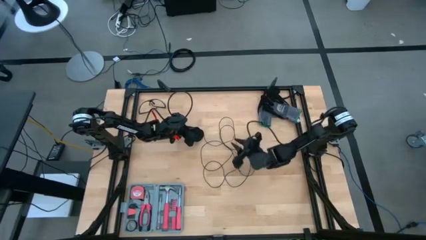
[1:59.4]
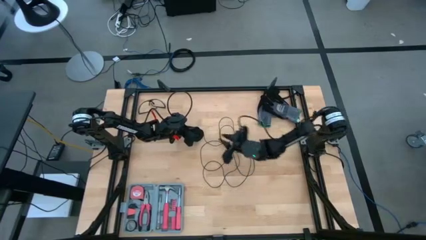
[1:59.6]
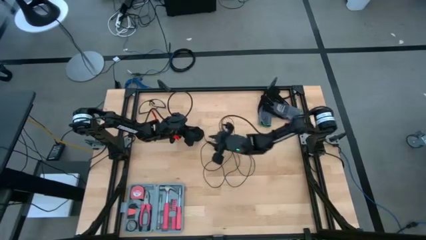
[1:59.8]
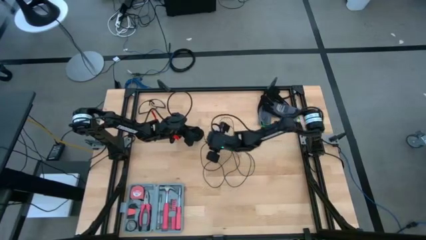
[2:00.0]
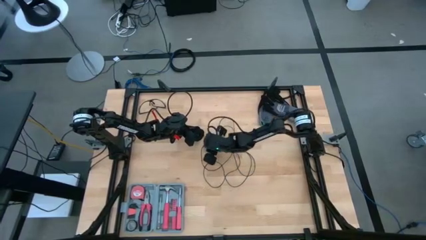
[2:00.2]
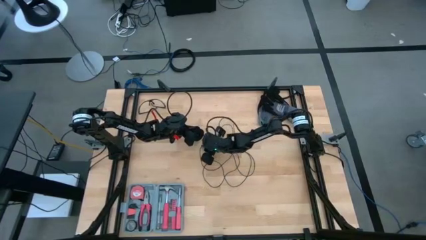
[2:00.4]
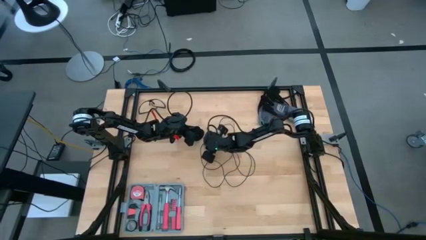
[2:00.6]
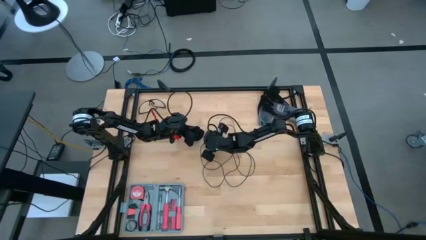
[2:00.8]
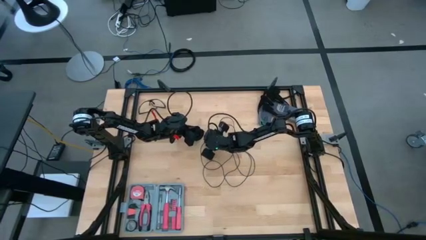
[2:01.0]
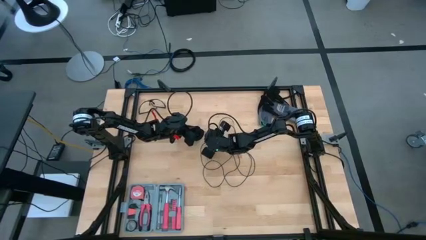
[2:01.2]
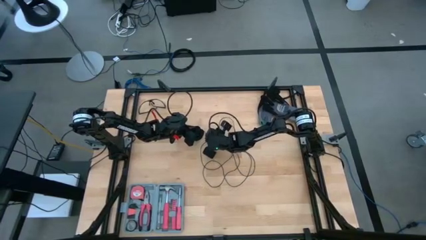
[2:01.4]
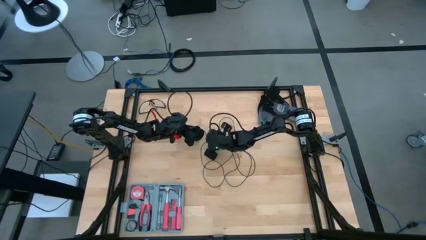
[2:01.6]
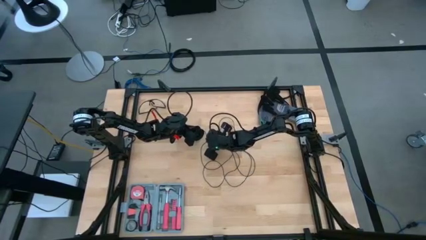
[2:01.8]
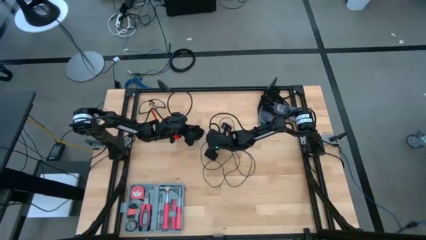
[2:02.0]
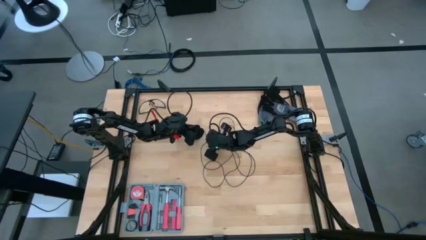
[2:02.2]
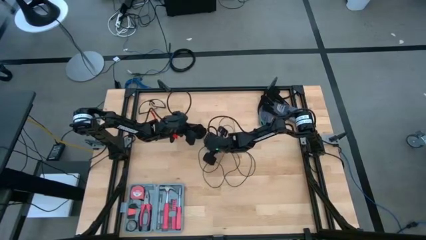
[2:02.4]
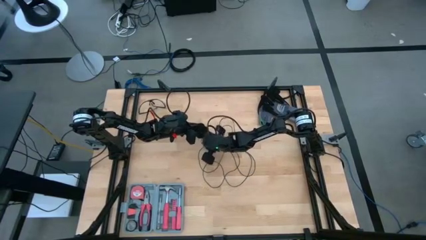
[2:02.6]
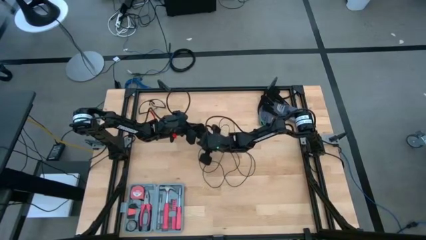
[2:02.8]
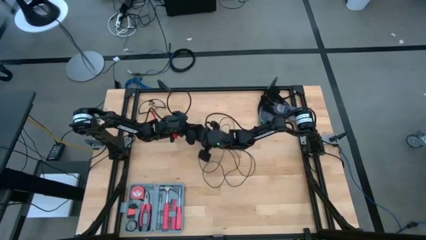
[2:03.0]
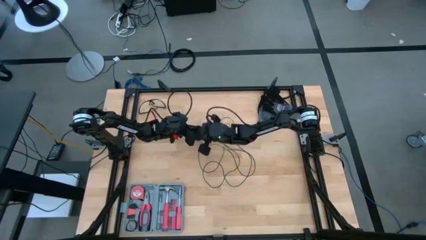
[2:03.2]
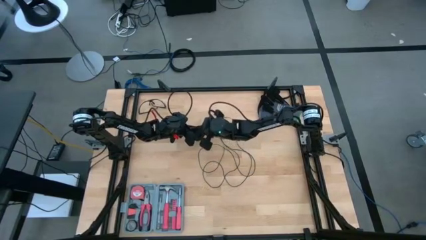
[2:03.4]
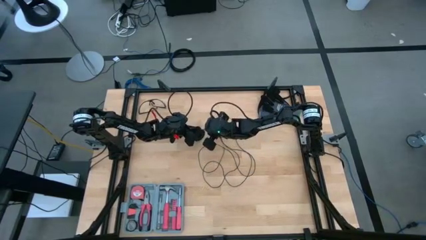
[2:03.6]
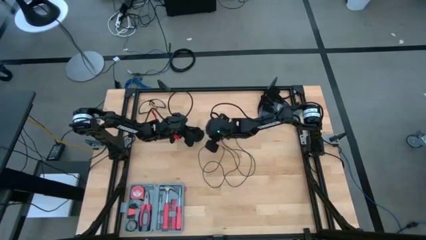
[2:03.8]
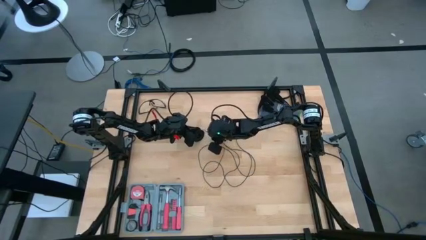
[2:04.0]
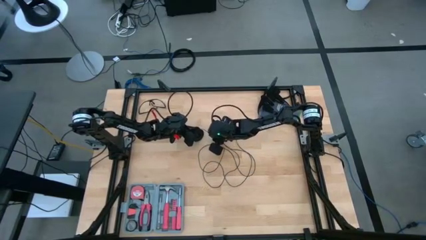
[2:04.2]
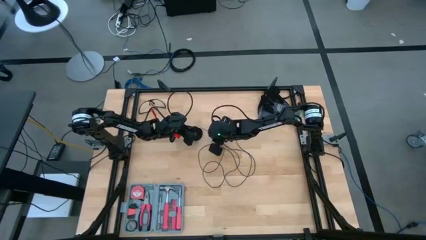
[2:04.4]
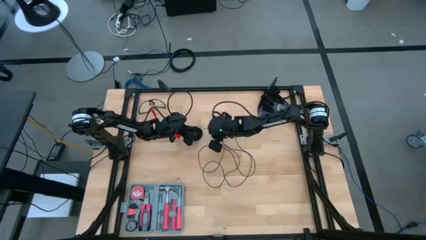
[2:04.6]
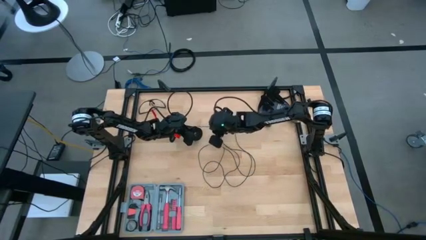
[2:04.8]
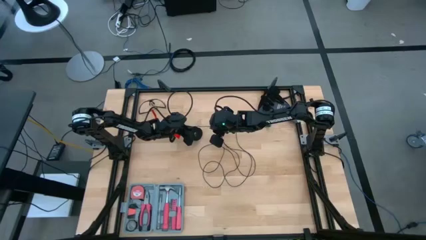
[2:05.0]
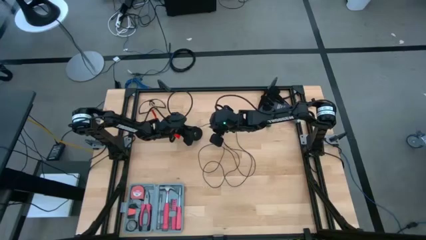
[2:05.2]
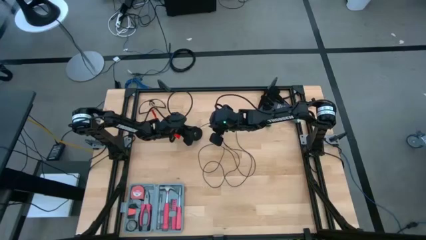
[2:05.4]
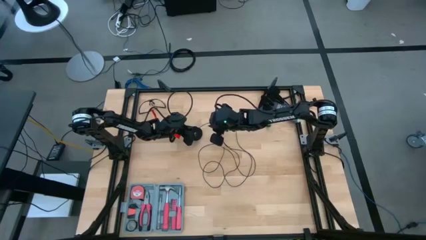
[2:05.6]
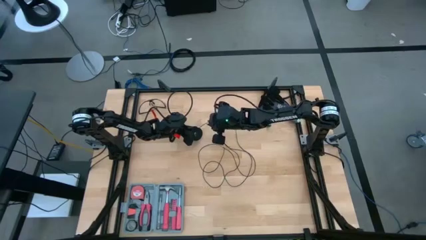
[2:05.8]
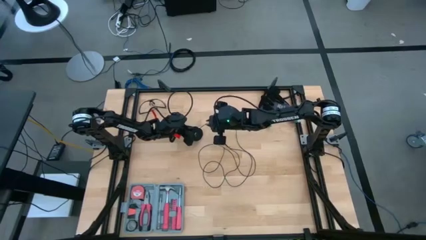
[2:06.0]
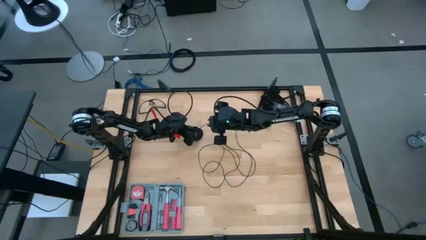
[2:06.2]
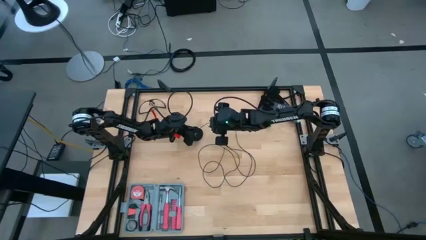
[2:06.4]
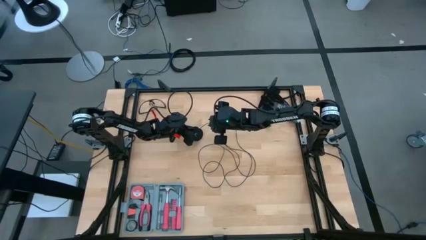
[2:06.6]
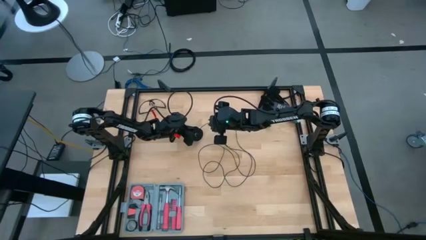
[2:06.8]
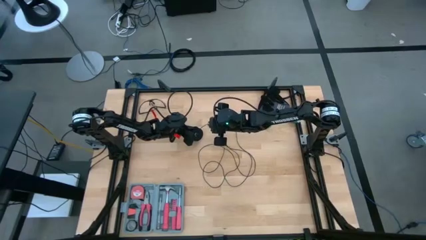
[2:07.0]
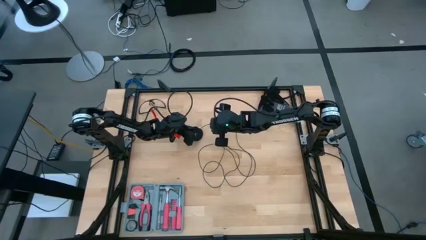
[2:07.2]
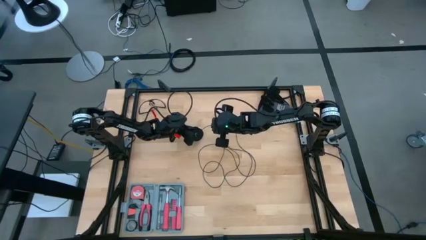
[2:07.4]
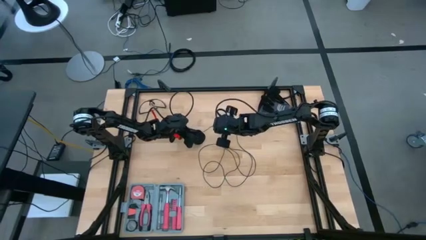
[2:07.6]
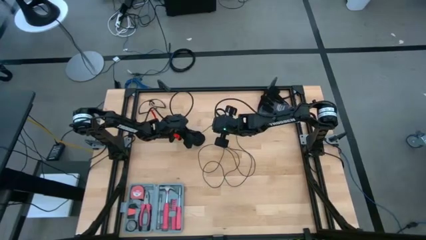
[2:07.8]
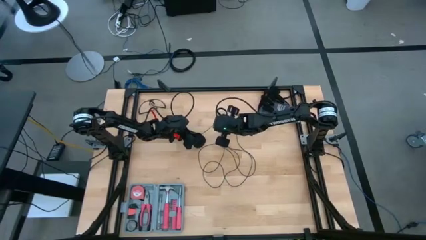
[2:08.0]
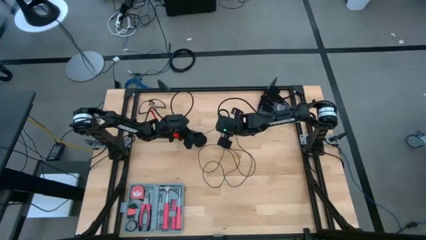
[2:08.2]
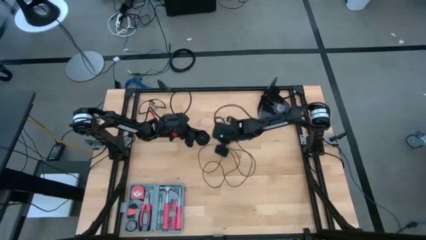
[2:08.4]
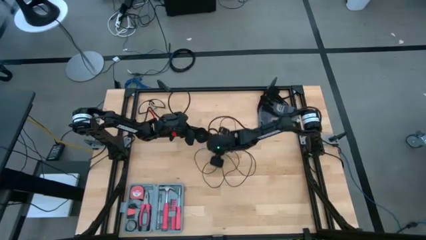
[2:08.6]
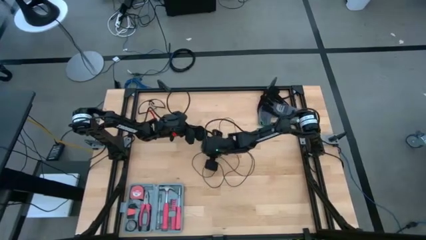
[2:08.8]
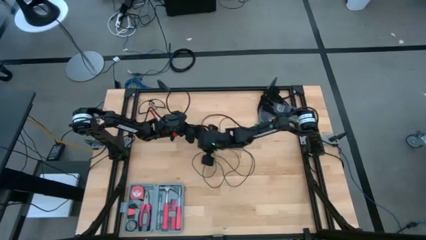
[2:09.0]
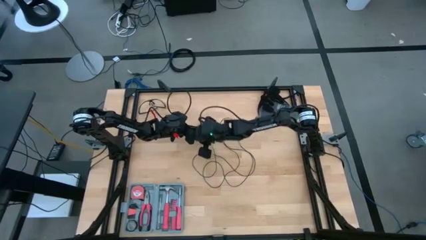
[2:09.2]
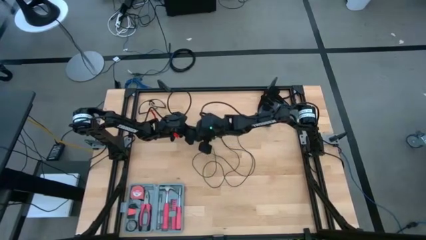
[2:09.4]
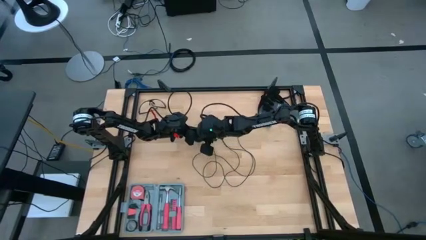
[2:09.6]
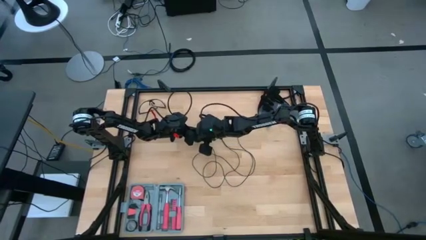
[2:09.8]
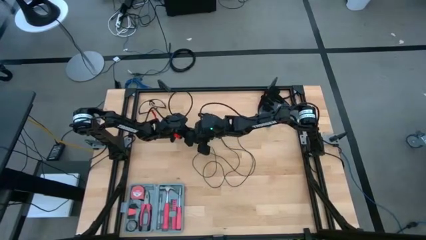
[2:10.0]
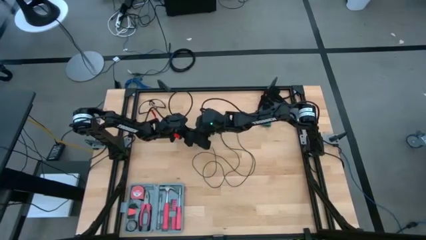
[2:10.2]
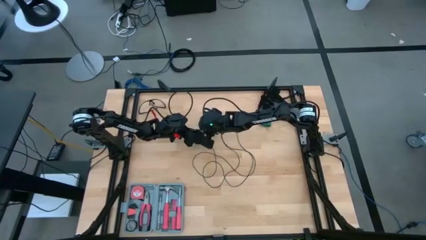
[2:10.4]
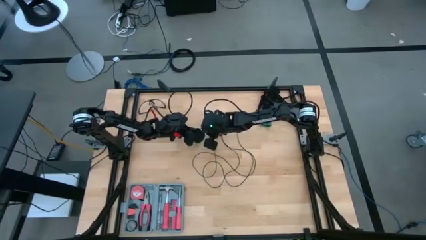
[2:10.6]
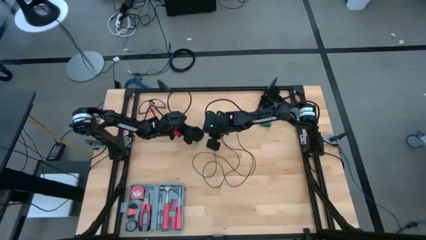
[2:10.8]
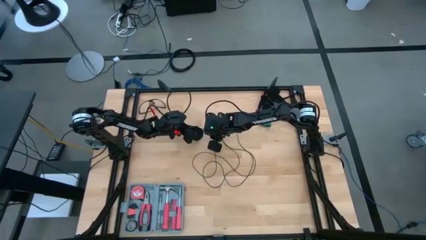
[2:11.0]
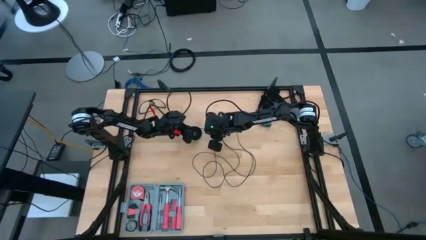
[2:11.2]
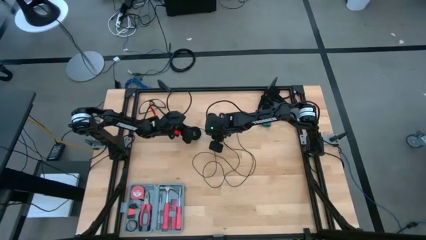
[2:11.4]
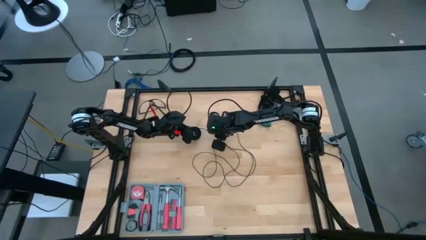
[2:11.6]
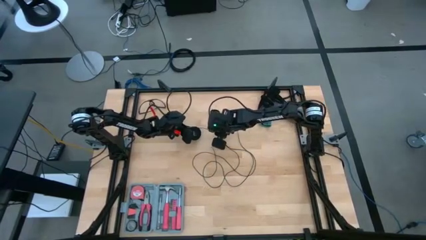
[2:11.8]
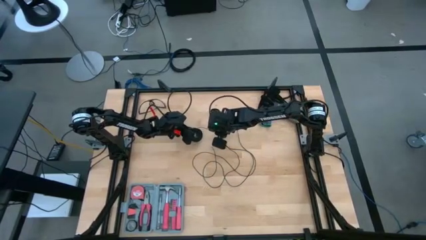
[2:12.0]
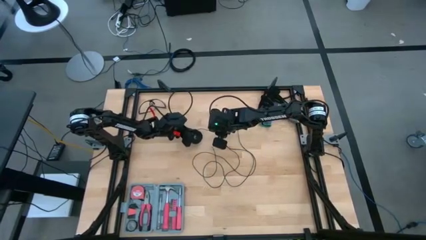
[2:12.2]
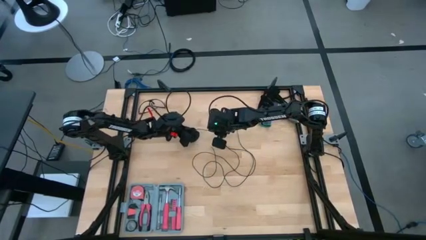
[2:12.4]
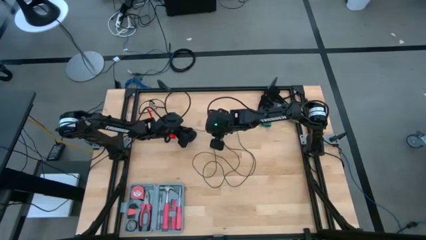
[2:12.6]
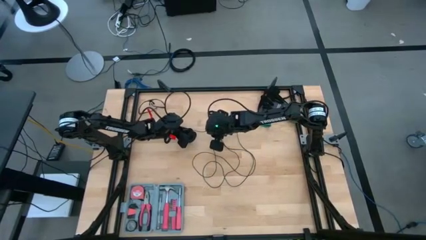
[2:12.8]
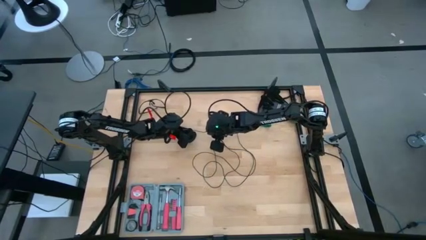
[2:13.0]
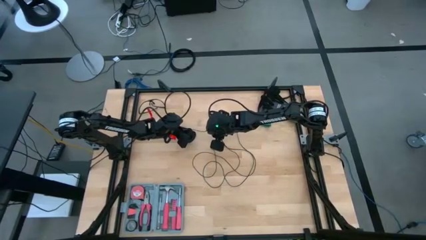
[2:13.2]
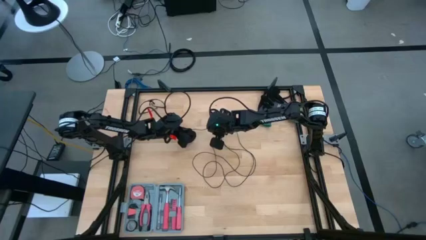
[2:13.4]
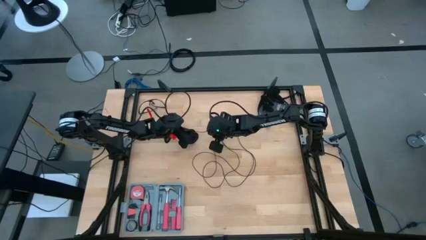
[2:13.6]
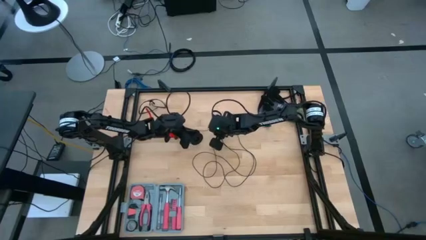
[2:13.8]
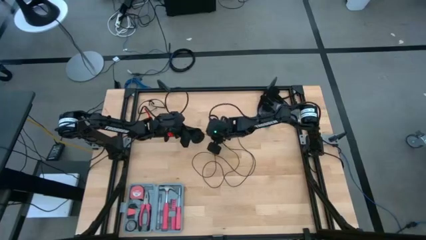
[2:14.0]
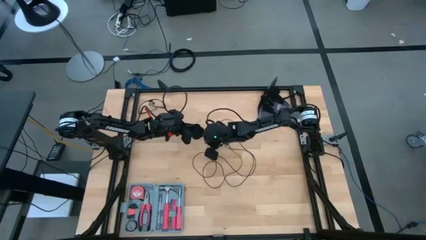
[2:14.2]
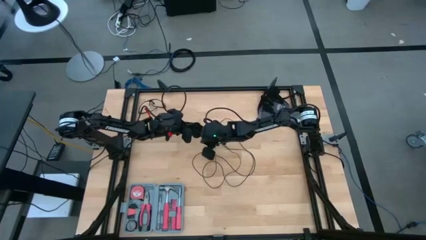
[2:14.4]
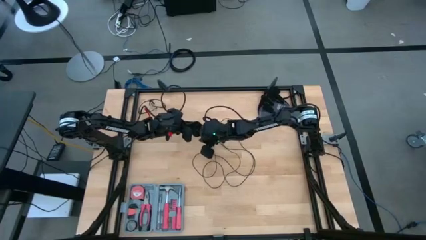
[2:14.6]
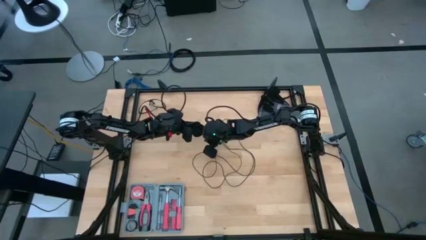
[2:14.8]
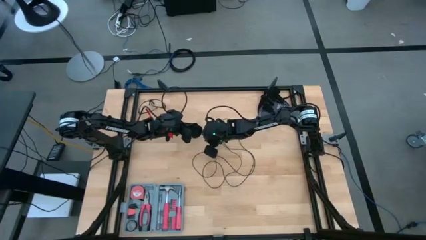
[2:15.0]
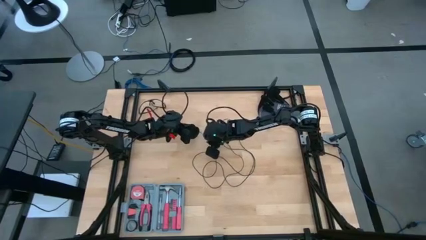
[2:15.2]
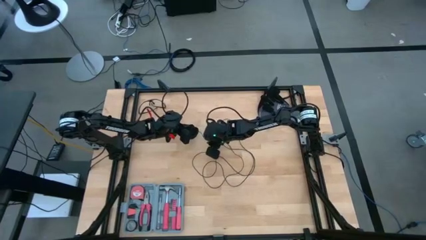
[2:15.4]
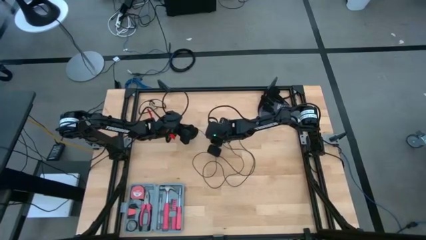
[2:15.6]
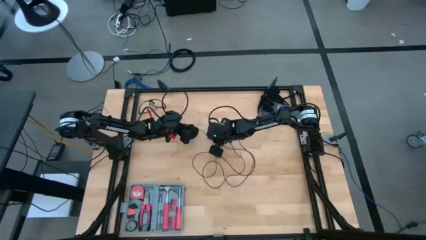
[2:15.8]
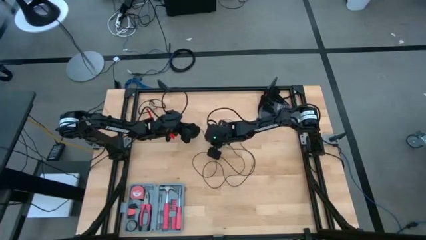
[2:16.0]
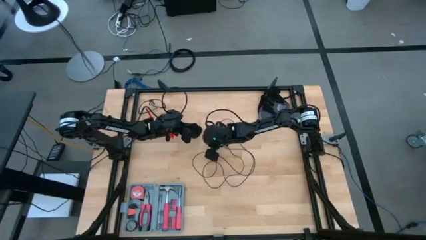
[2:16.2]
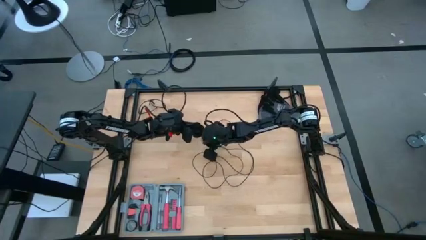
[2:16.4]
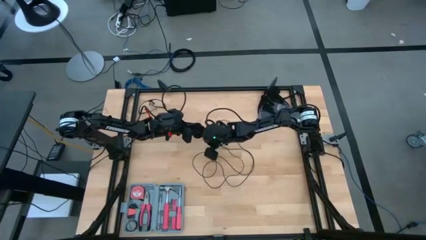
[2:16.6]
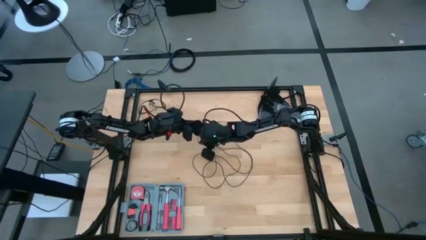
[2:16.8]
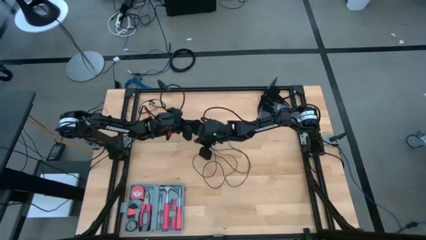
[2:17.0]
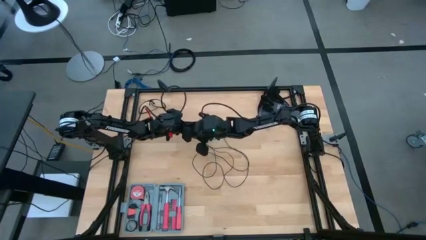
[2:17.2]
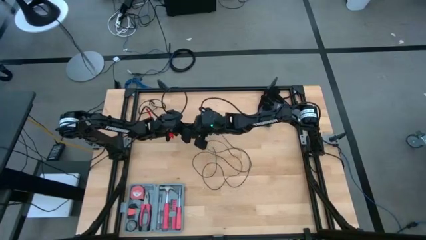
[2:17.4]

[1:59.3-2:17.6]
Task: Coil cords
Coil the black wire onto the black spool
